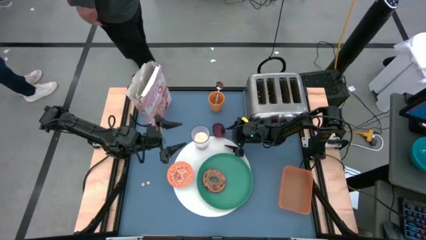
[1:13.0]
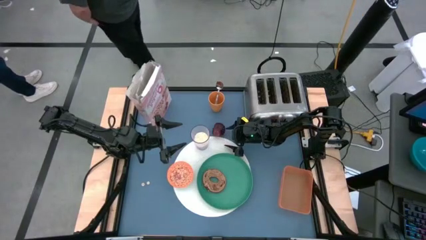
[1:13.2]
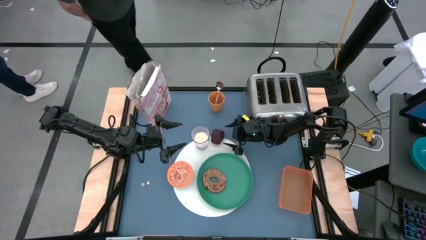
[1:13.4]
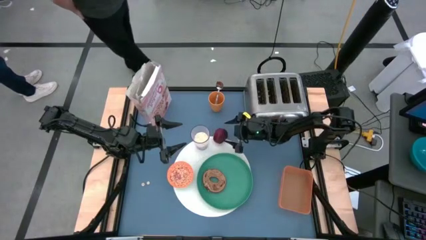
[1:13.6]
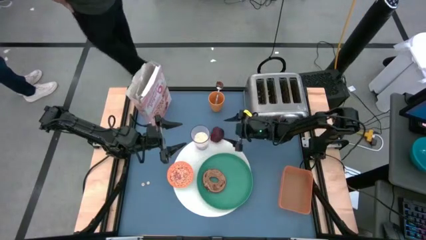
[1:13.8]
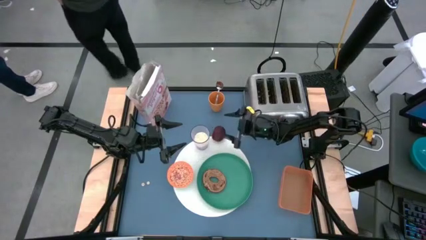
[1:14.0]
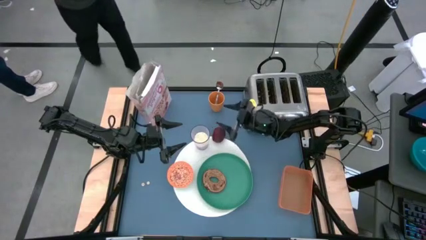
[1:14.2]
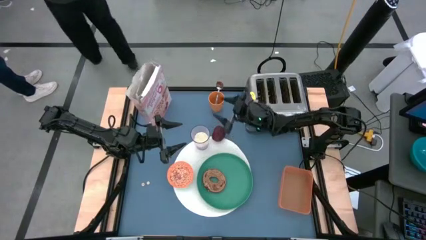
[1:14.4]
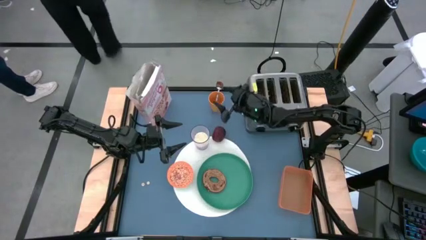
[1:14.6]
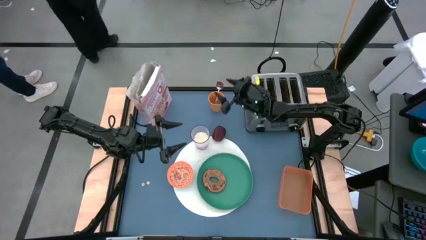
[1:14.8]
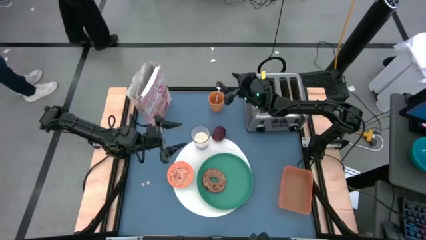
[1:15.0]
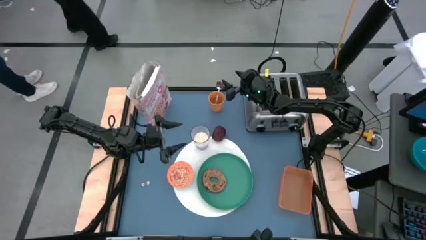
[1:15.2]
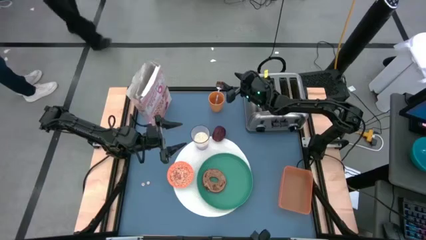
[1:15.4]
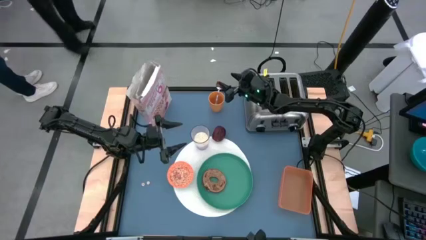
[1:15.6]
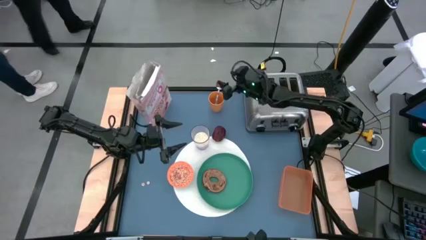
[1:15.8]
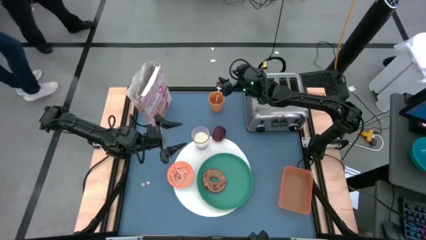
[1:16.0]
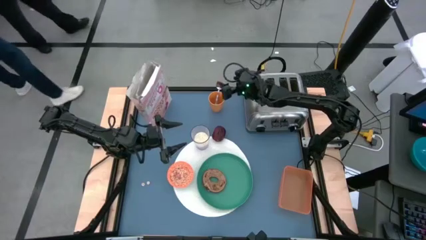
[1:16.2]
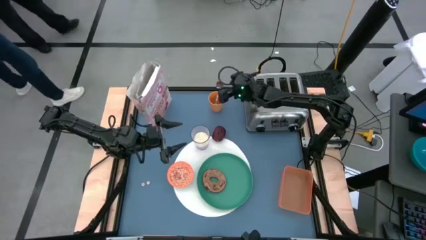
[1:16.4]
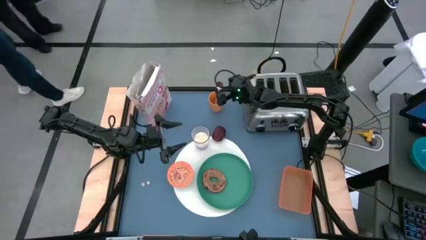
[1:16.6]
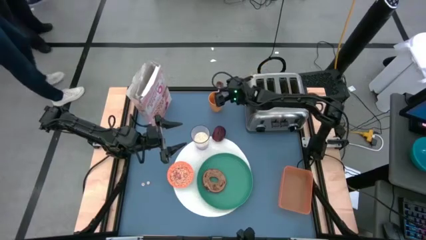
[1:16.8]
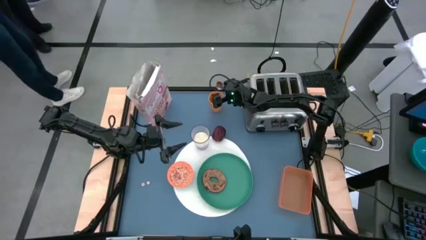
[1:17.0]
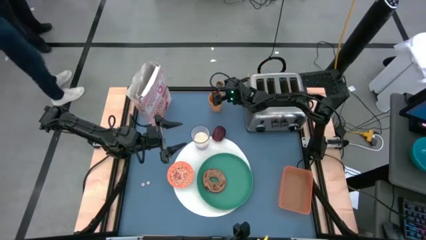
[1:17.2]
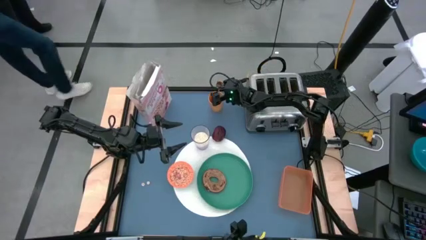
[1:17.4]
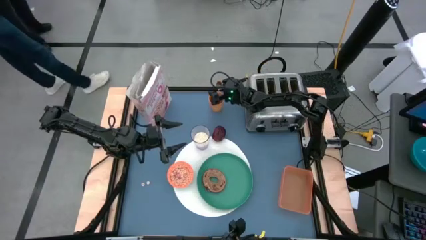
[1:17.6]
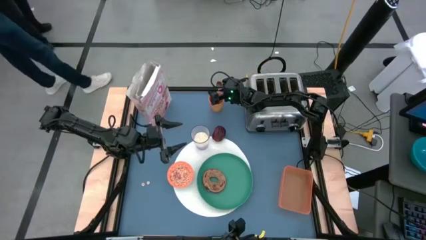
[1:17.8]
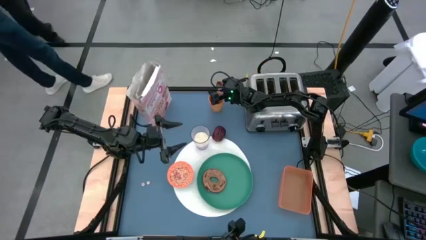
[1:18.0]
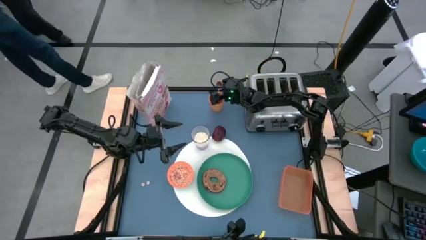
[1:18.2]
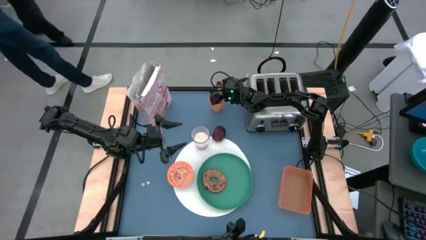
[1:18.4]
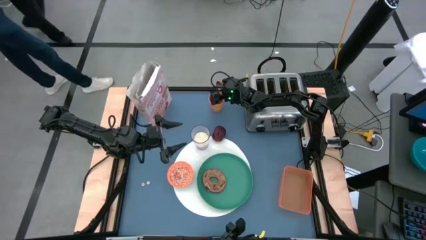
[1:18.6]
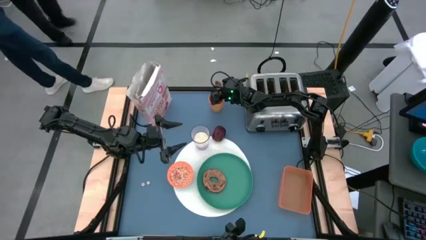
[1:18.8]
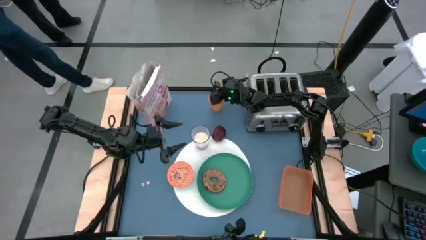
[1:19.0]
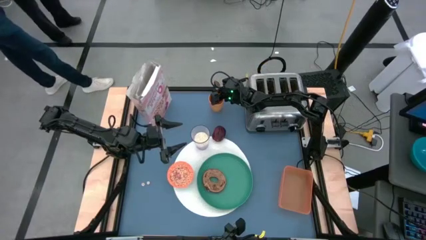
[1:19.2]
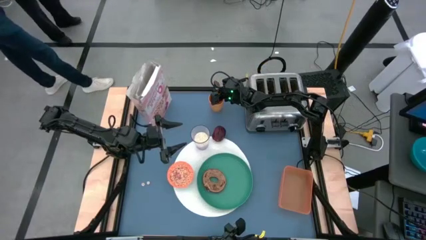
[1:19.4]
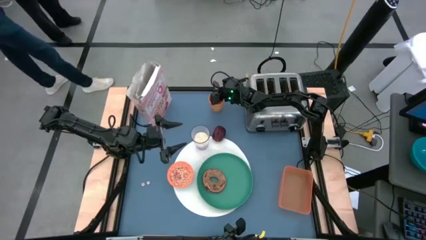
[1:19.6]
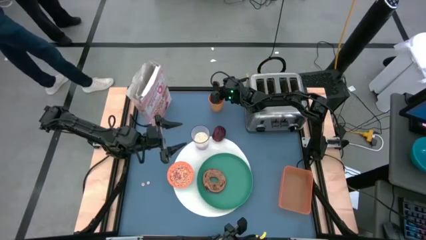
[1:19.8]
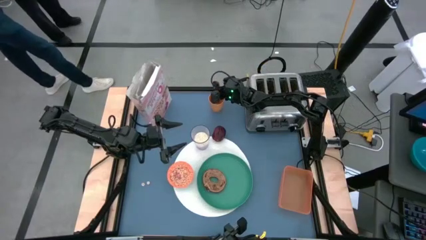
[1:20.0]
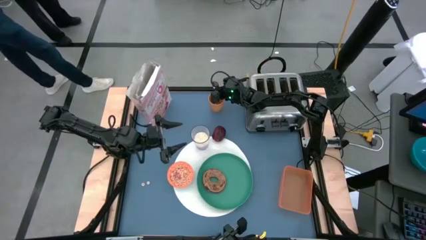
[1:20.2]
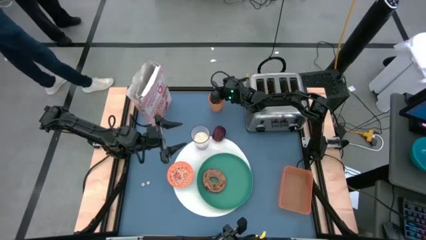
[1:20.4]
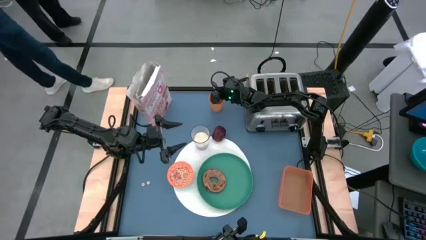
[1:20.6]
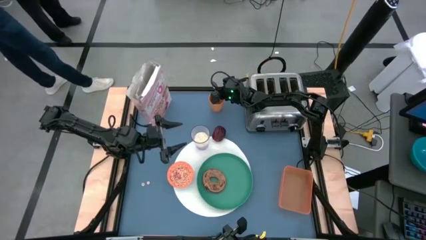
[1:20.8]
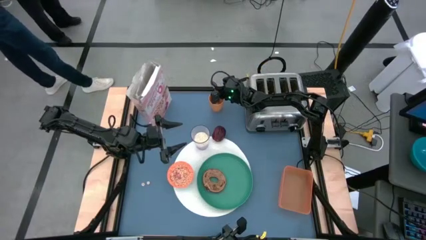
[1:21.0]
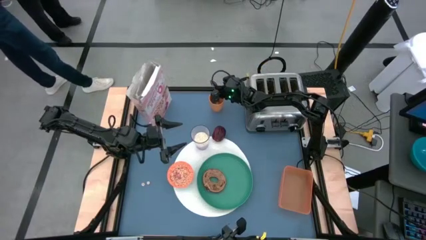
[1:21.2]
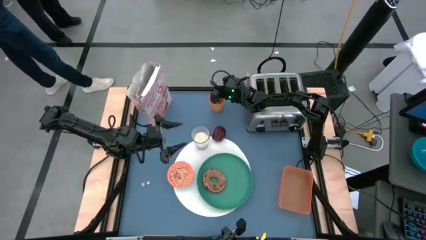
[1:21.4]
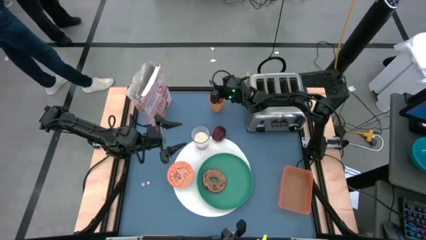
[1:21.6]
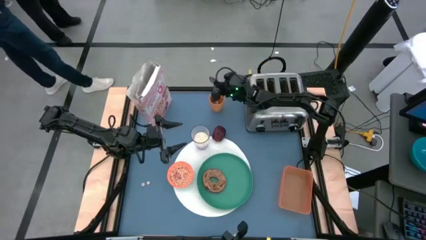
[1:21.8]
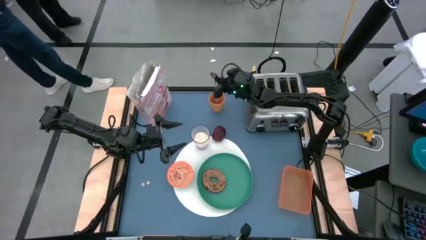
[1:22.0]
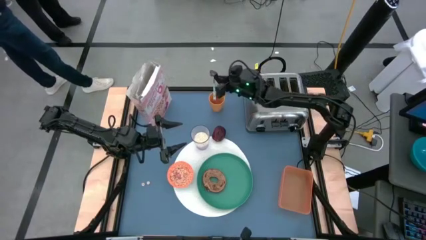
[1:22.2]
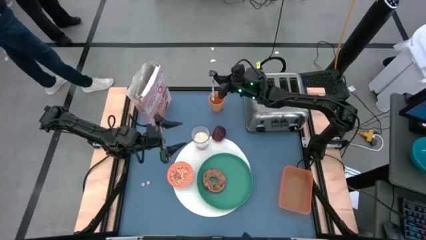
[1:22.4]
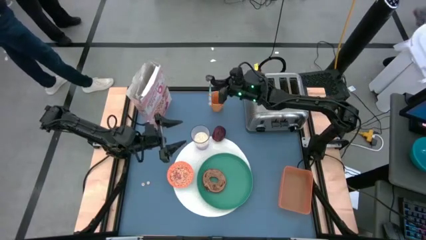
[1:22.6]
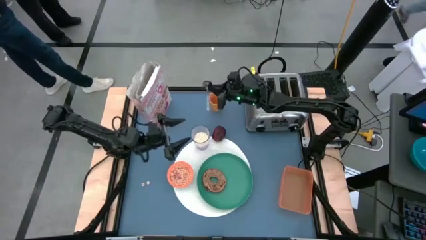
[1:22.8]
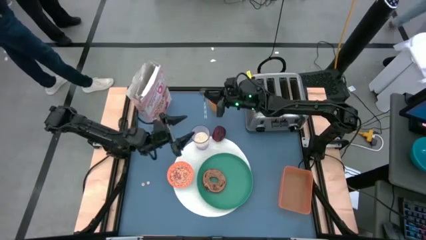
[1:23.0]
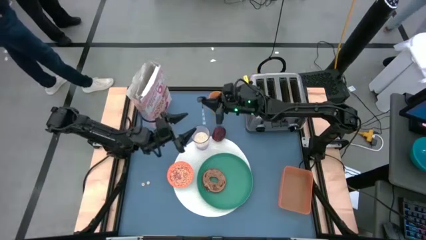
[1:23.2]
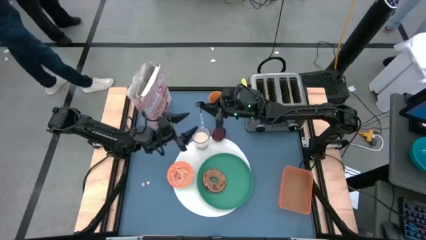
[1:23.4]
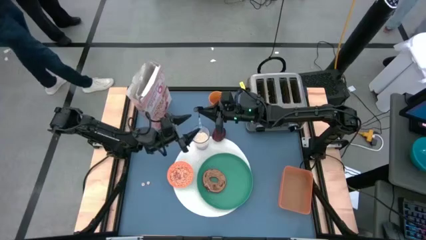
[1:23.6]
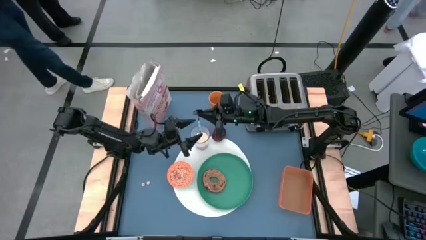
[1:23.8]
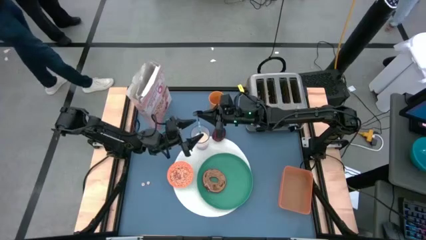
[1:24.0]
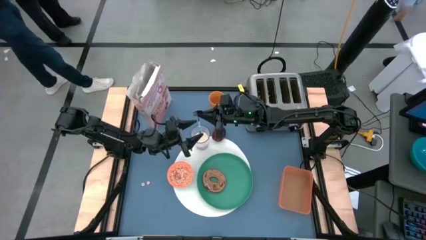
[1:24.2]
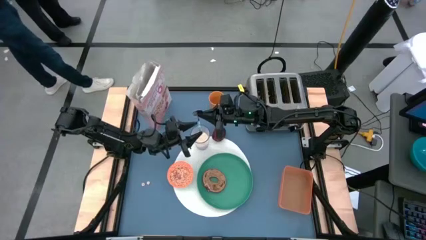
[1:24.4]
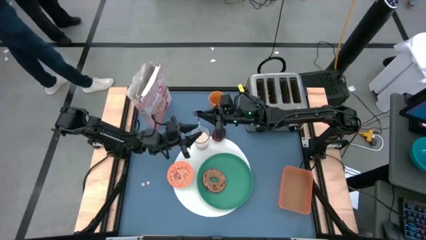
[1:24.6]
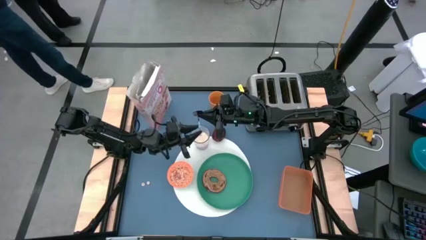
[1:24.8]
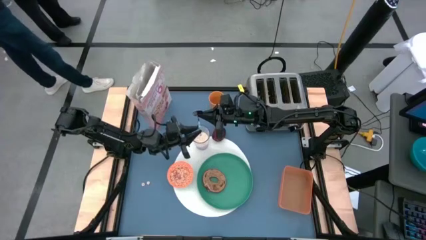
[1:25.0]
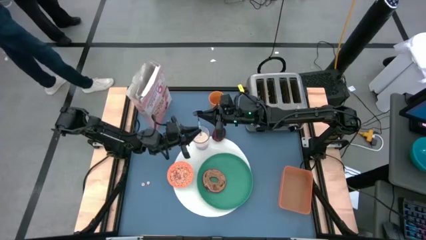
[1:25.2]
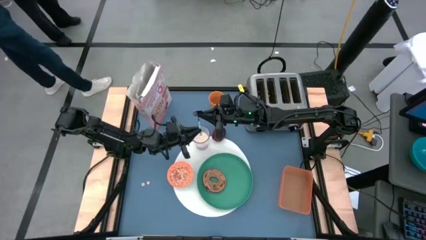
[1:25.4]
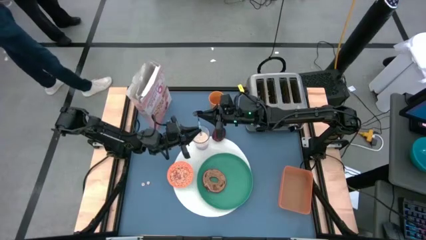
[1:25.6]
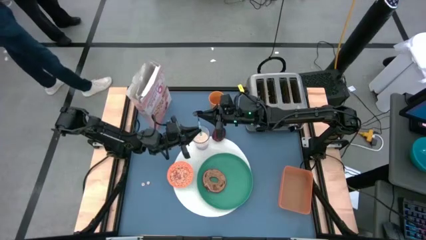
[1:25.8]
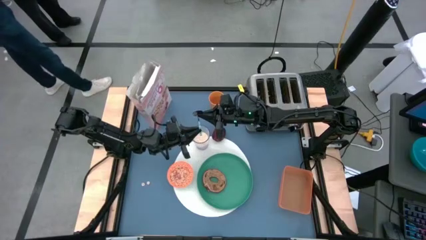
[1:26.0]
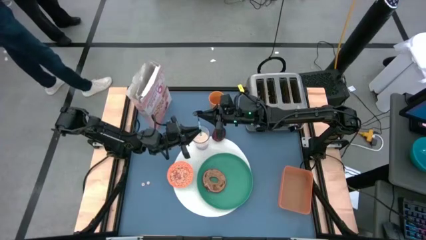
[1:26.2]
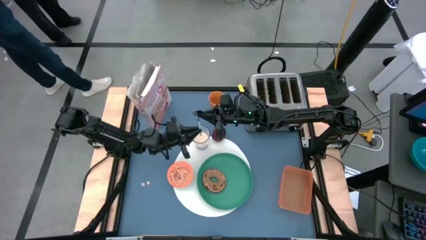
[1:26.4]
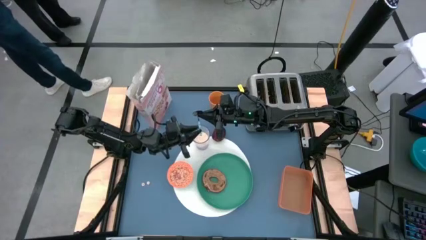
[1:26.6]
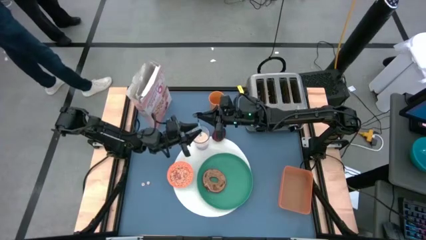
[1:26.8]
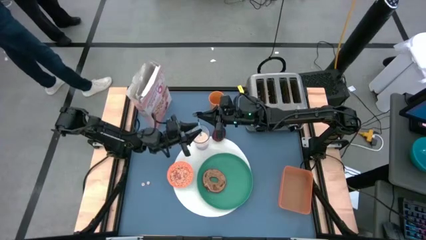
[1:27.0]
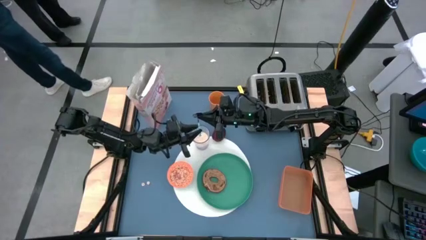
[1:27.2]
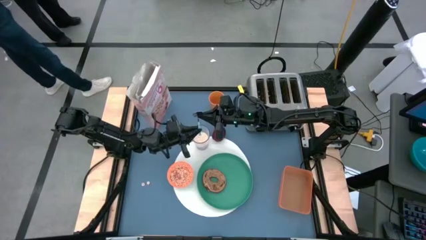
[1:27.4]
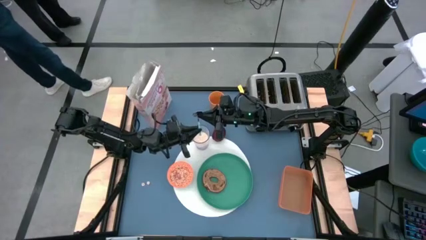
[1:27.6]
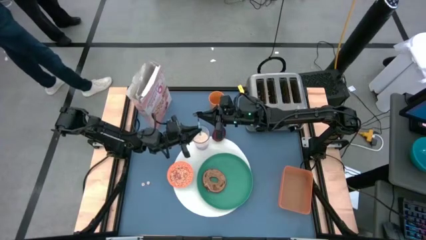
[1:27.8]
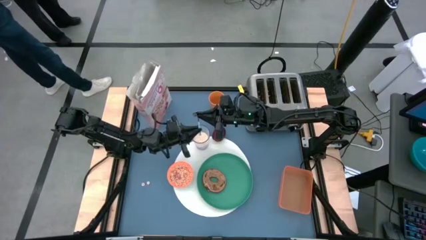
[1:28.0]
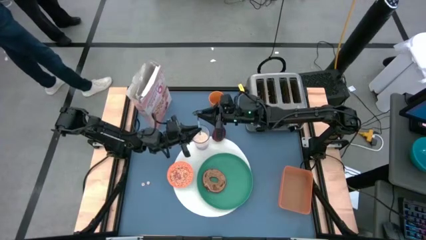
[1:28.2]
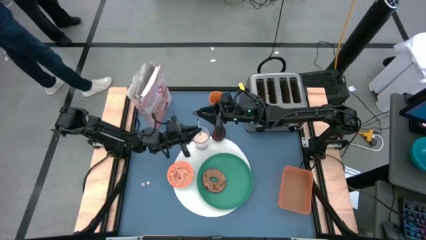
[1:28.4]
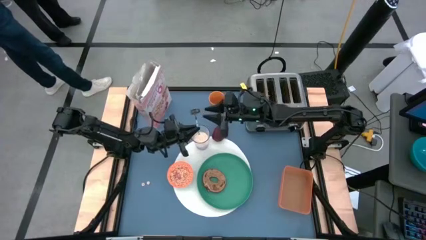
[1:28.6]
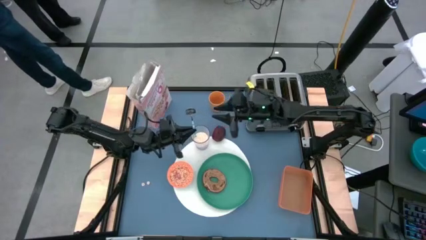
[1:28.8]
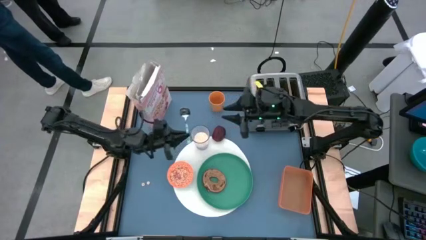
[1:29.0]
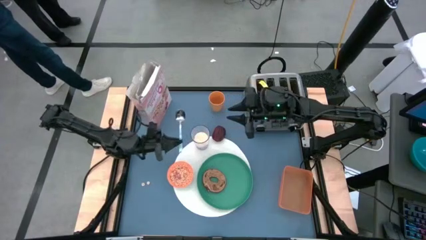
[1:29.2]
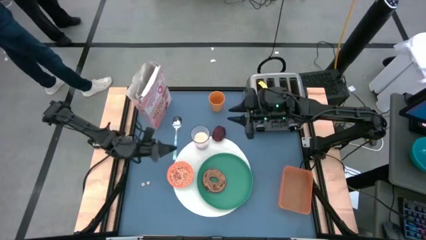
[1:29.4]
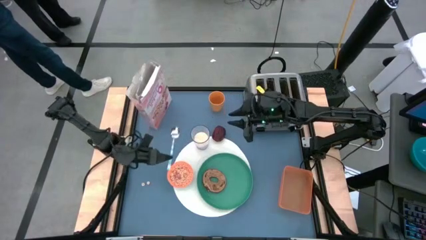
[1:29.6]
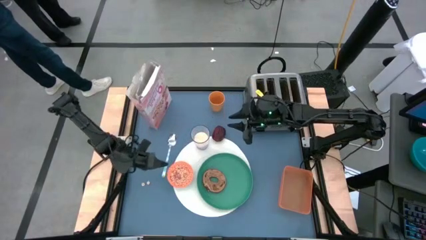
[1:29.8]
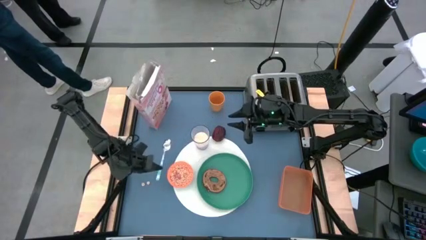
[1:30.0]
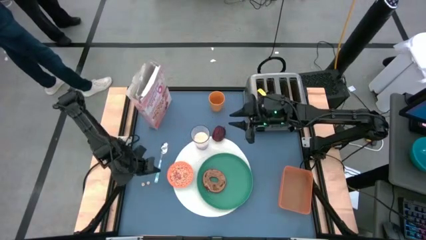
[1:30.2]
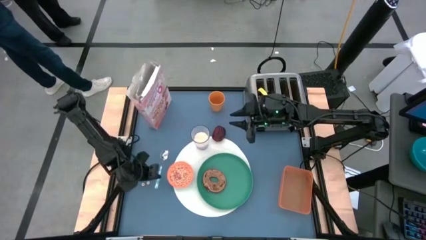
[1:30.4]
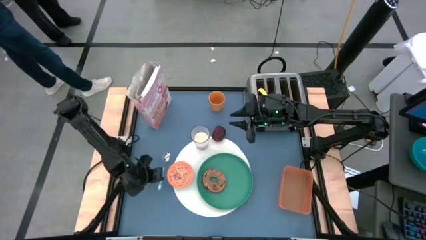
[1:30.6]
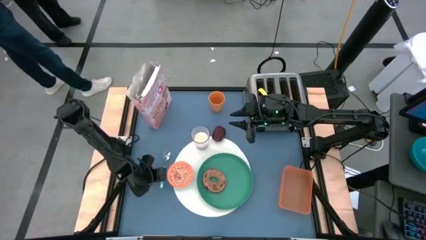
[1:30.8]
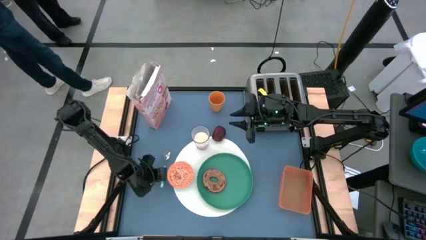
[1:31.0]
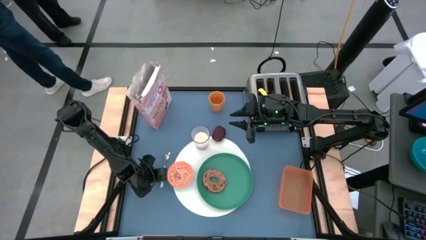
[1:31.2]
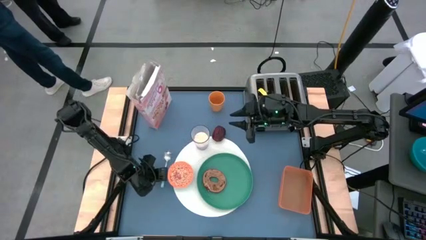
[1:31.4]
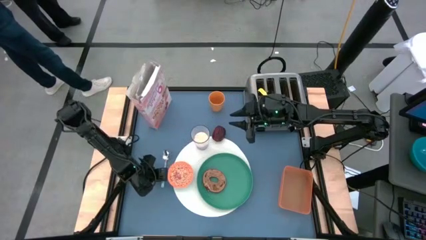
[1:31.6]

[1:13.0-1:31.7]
Task: Arrange a breakfast setting
Put the blue spoon on the left side of the orange bowl
